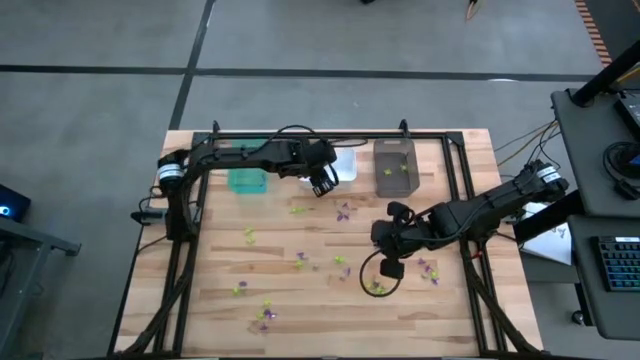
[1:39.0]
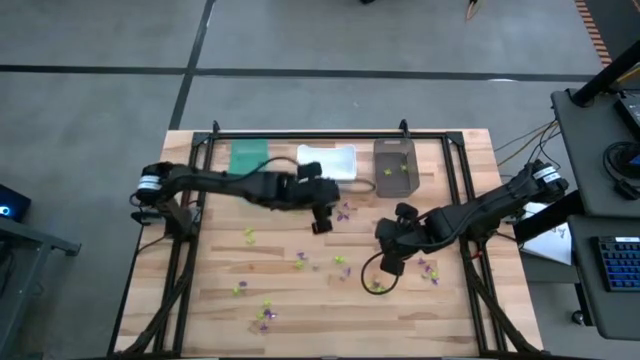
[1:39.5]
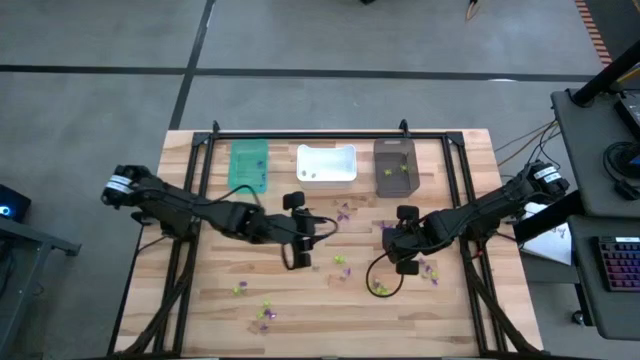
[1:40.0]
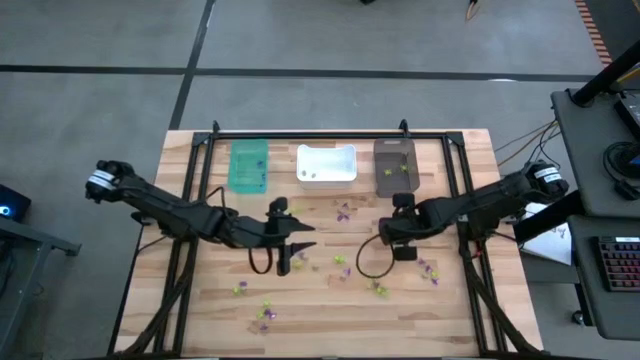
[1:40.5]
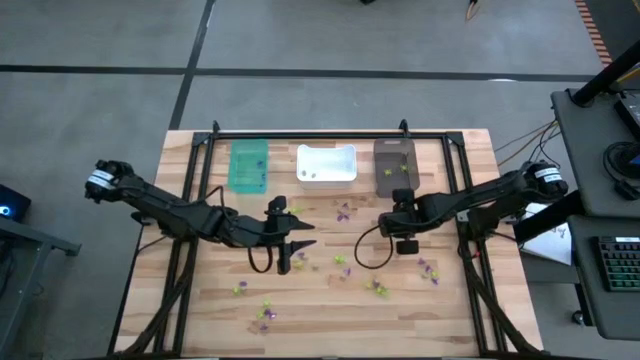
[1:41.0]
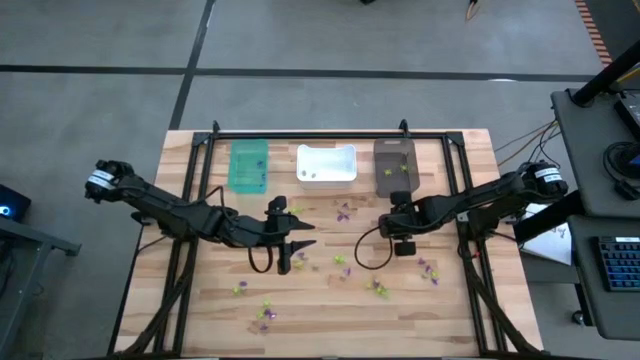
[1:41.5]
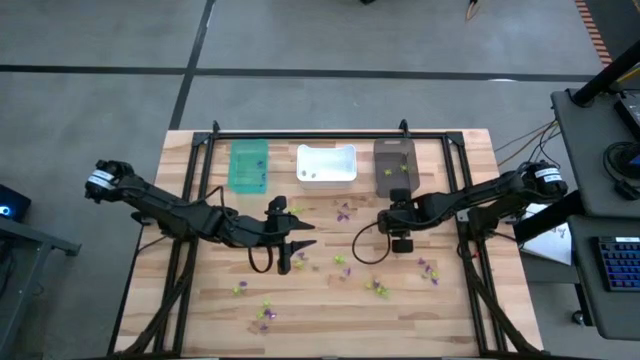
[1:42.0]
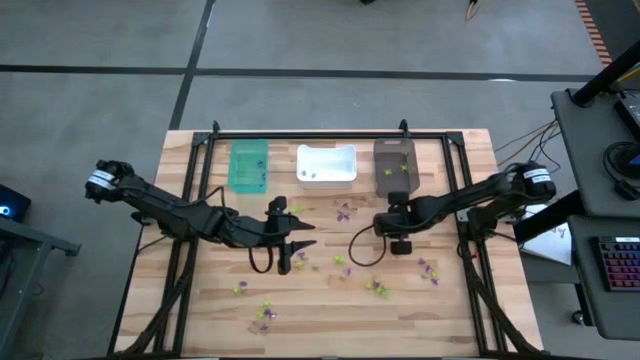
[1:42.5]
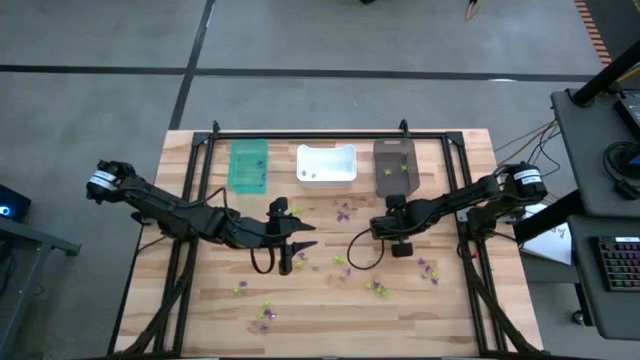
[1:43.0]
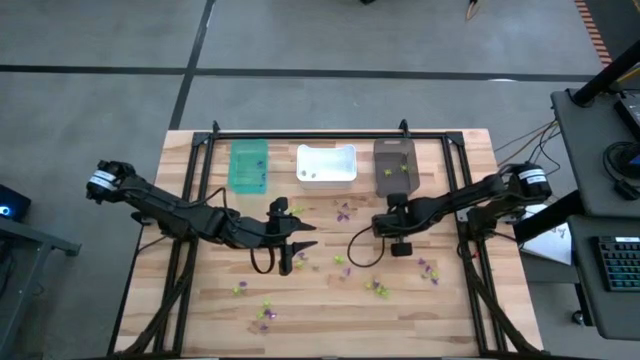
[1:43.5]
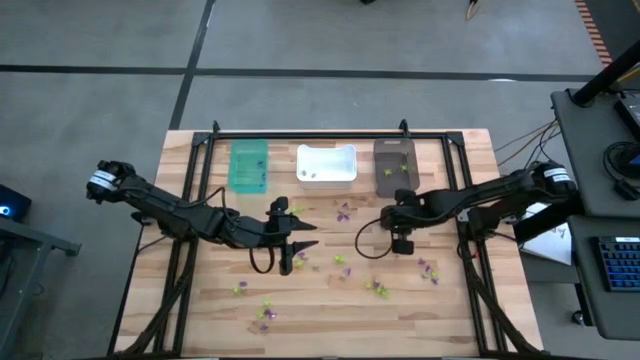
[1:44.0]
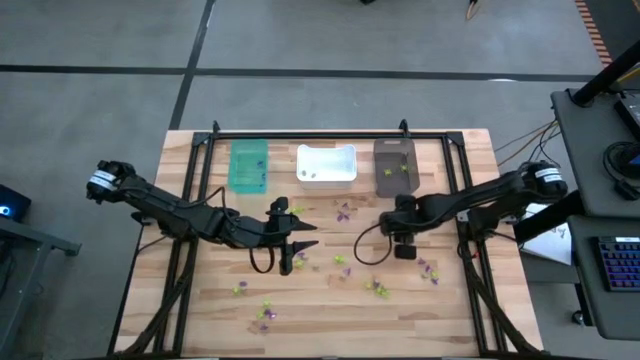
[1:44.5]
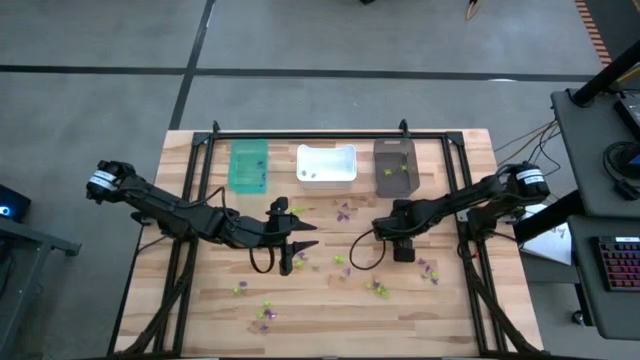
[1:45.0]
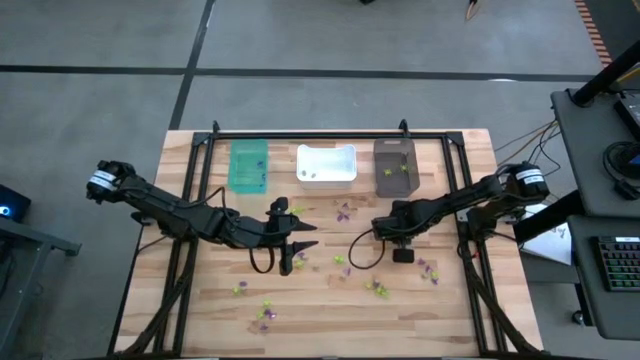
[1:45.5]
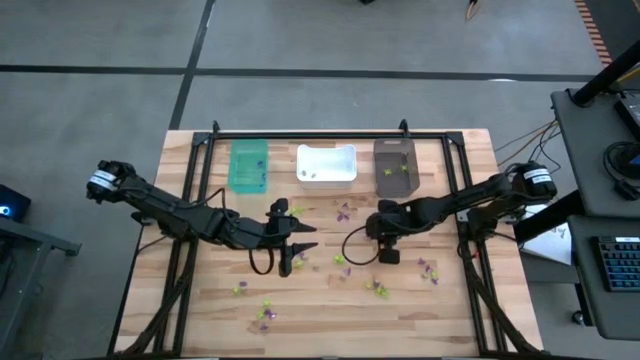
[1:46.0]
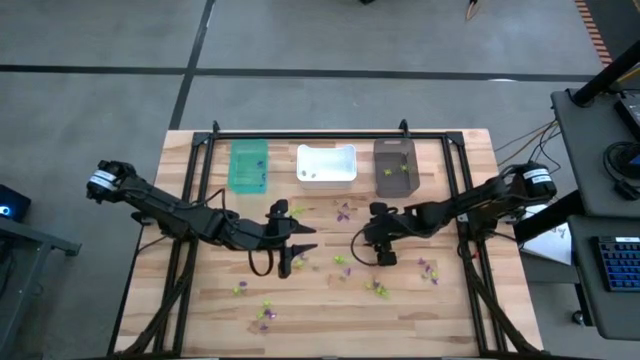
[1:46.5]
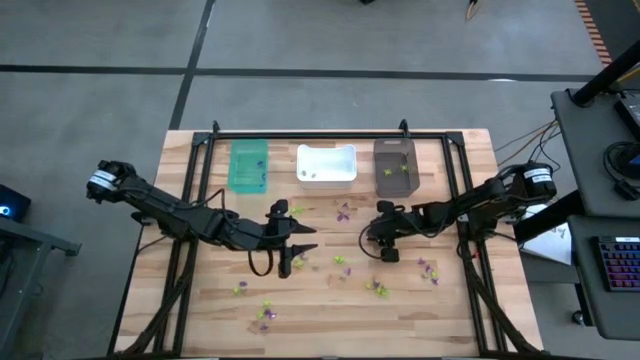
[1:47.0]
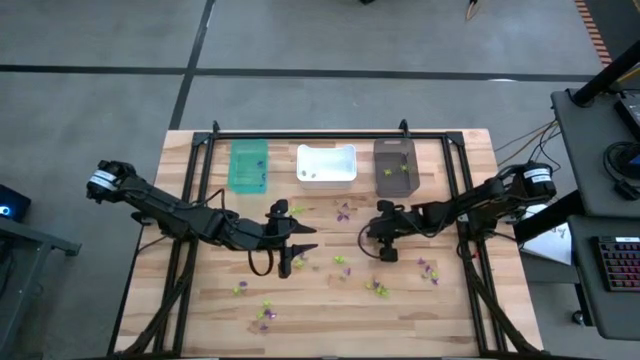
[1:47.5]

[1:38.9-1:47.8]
Task: Sort Halloween decoration
Put the purple witch hat toy into the light blue bin

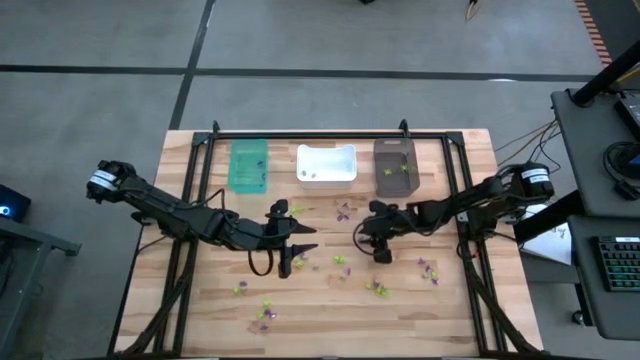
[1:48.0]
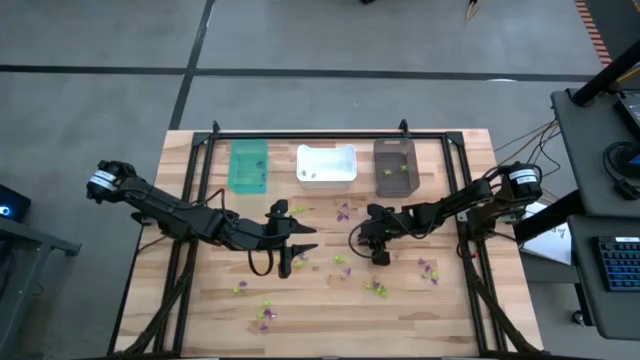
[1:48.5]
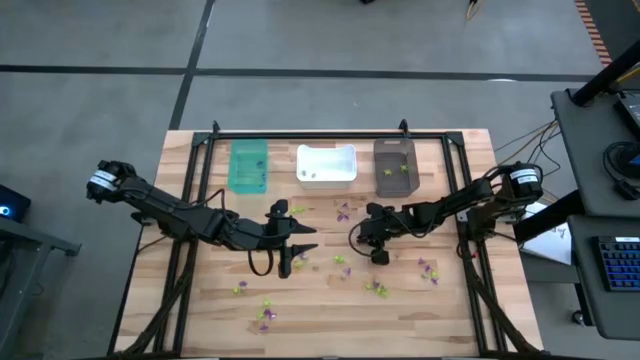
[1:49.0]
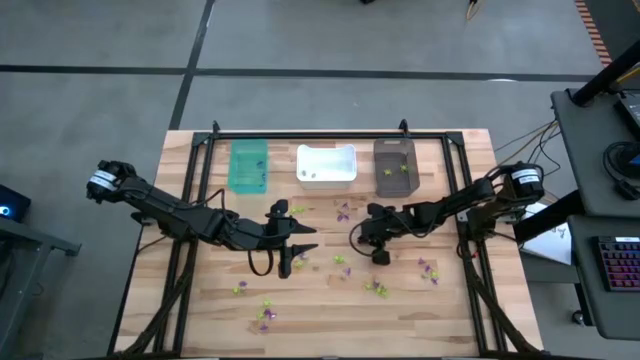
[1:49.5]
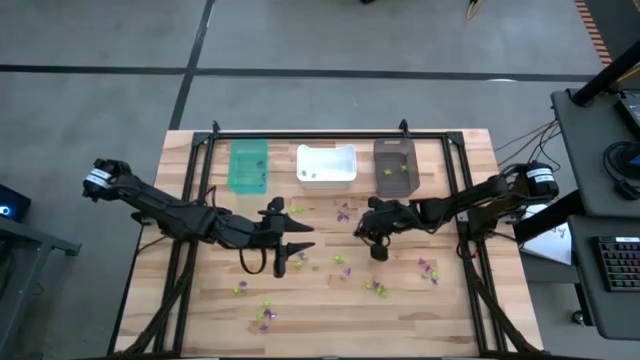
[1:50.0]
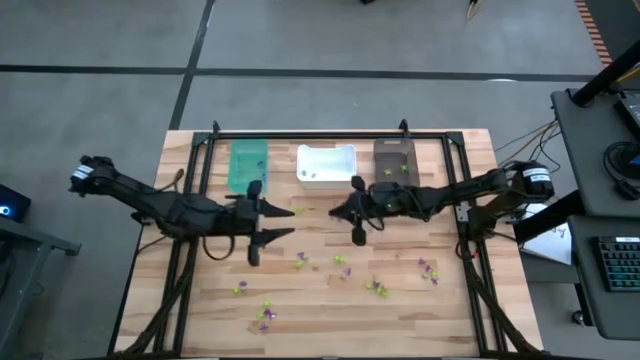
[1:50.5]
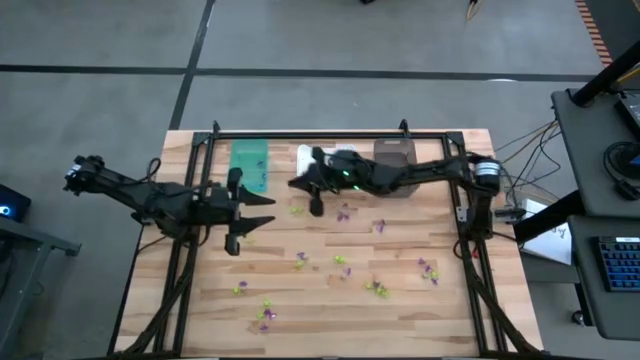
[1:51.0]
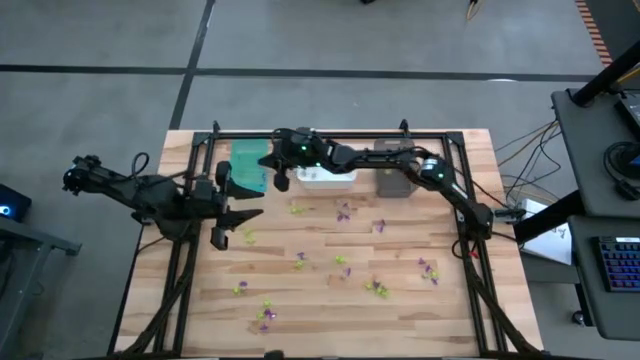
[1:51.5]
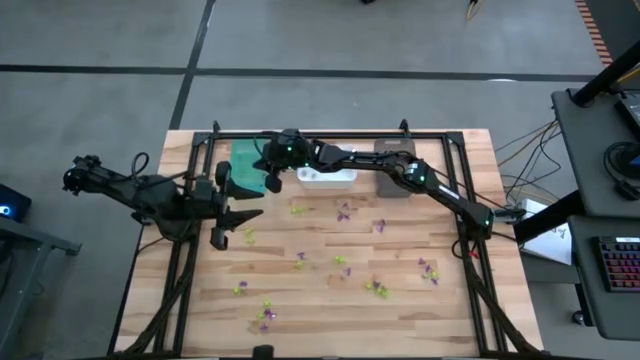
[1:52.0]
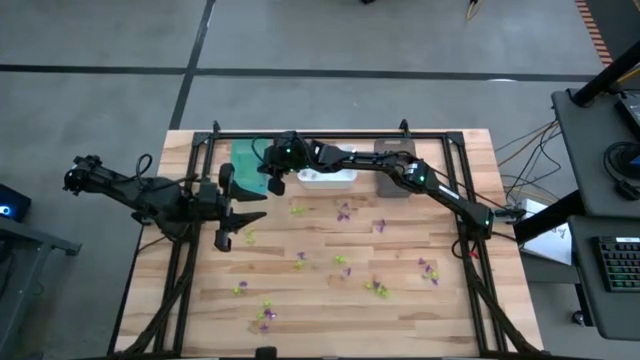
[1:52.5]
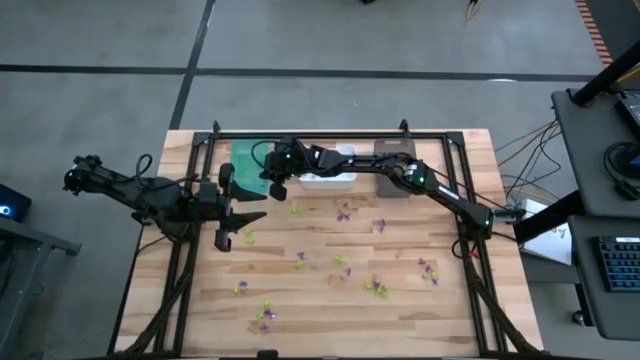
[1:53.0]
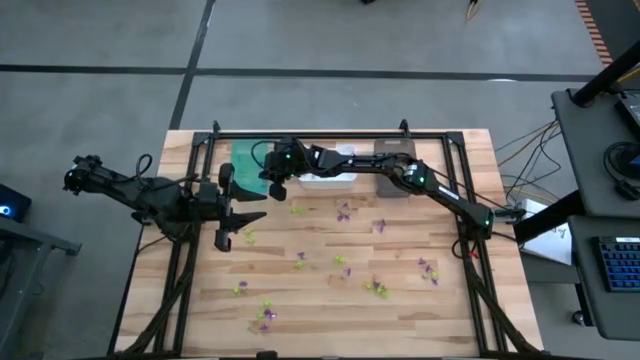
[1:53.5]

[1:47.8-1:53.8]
Put the purple witch hat toy into the light blue bin

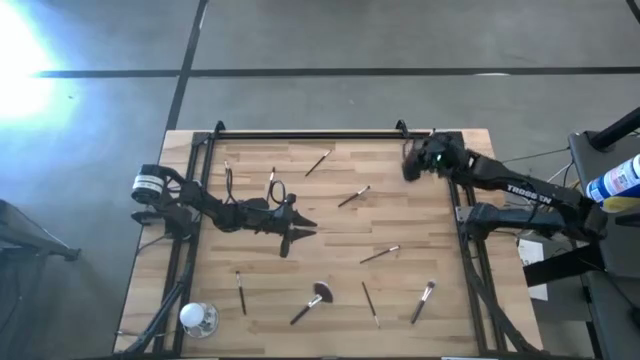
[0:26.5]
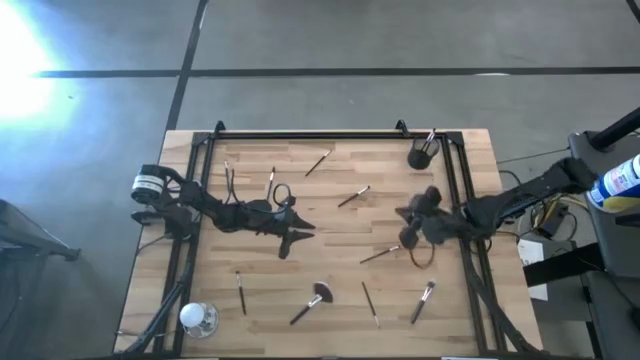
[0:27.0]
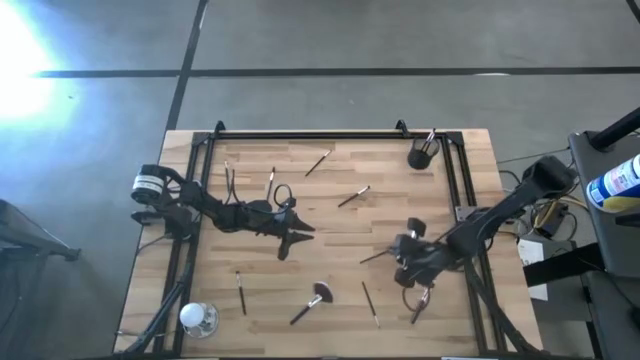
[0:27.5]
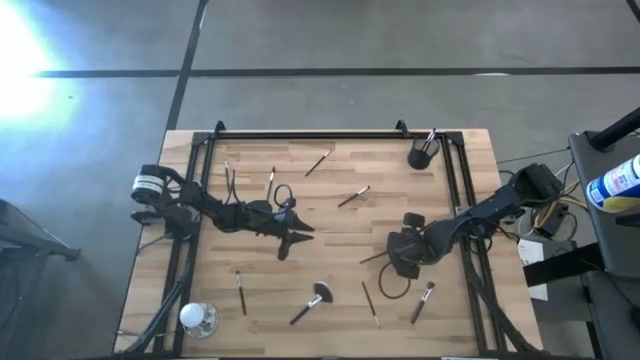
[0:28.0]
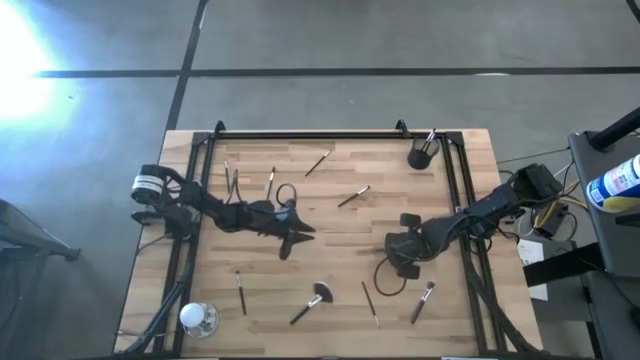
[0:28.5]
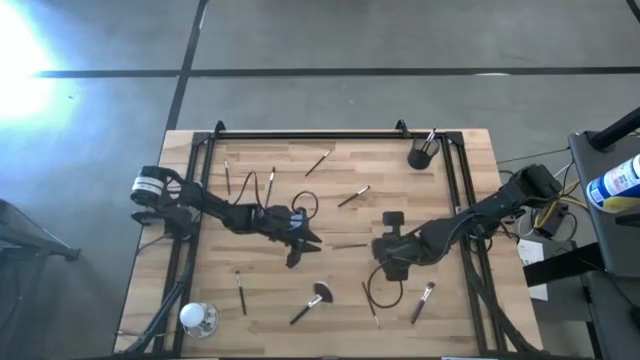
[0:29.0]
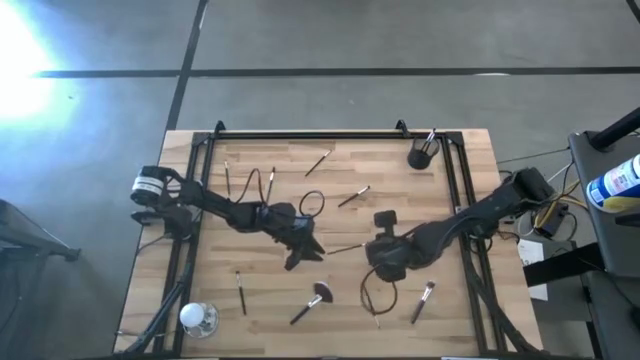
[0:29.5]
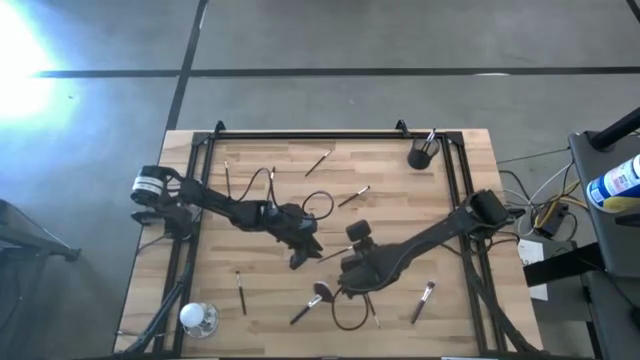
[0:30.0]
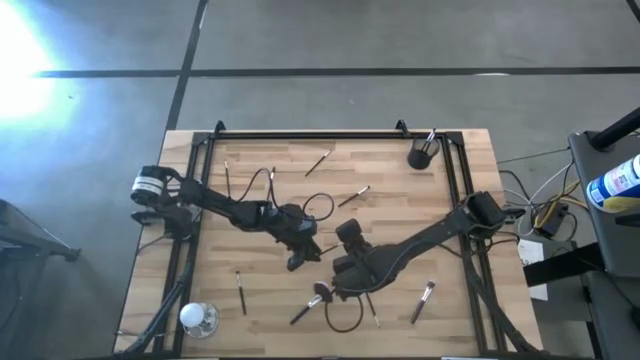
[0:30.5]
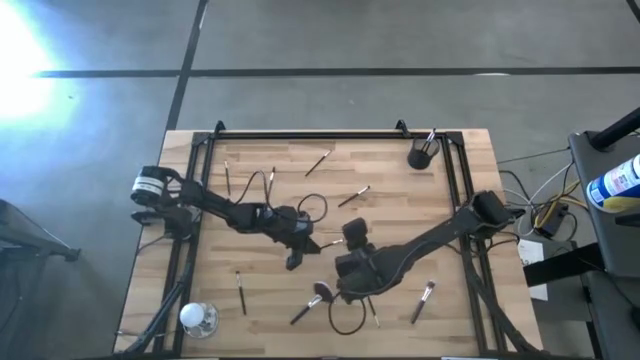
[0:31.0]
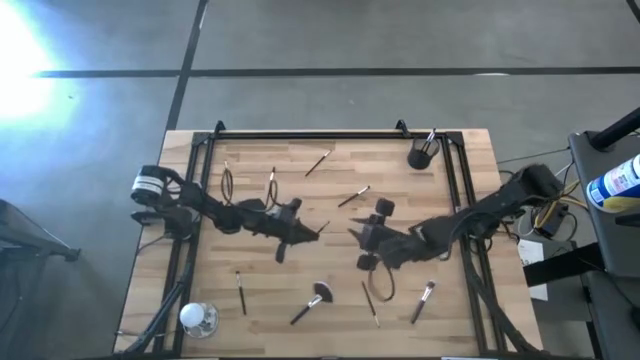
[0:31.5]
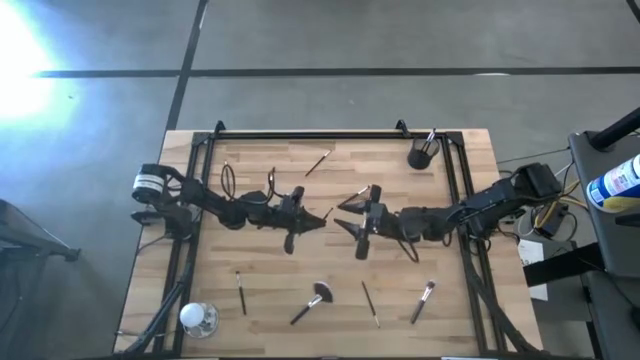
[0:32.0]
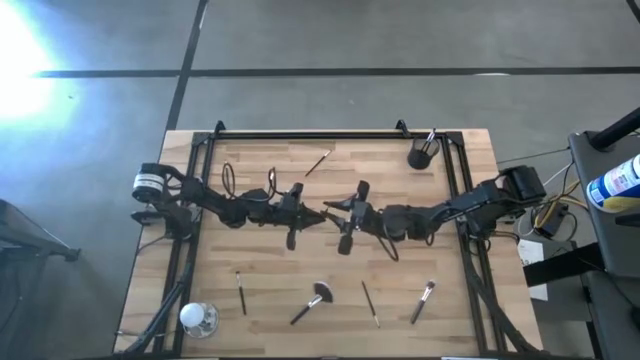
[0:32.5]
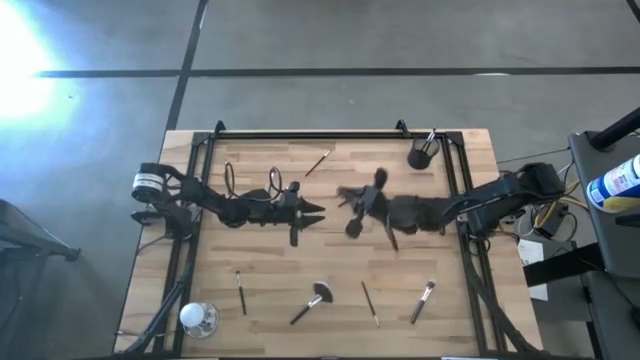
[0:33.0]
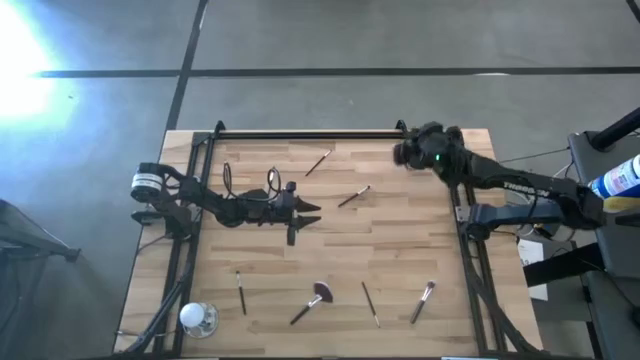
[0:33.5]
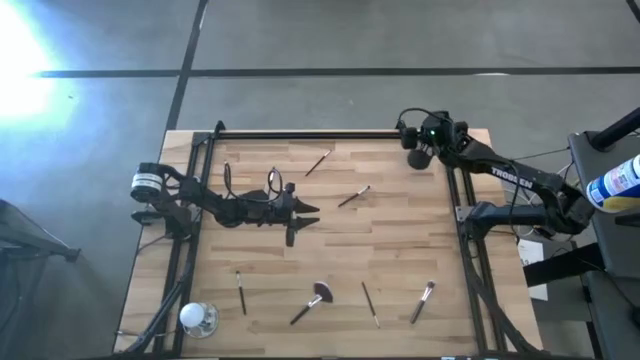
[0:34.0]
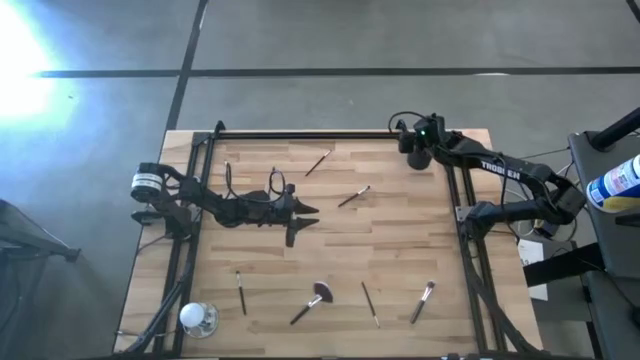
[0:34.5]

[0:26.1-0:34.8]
Task: Put items in baskets/containers
Put the eyeshadow brush into the pen holder
